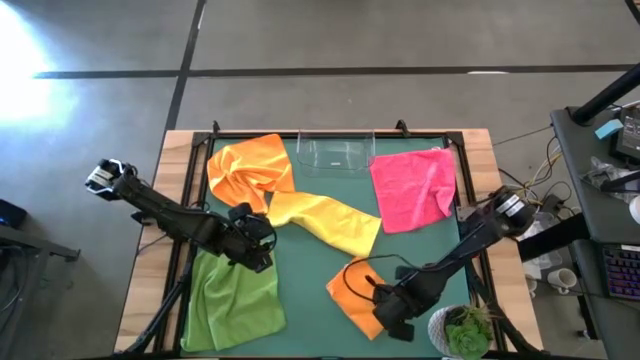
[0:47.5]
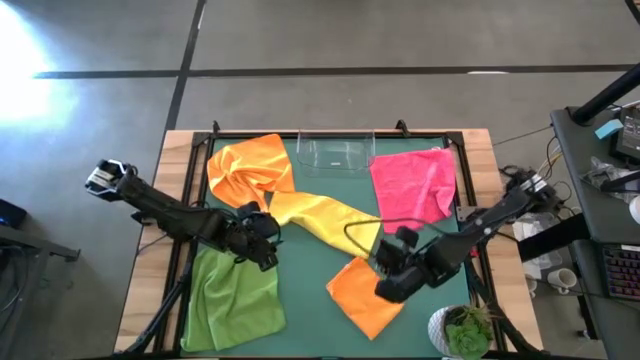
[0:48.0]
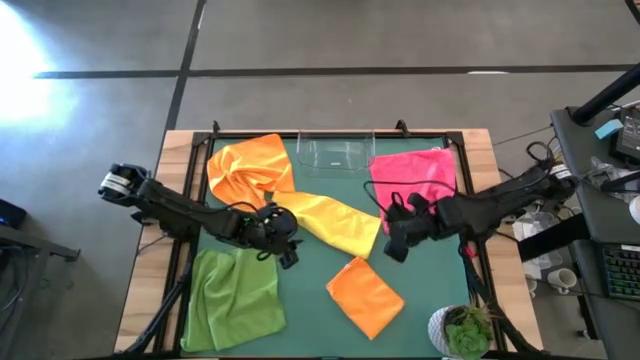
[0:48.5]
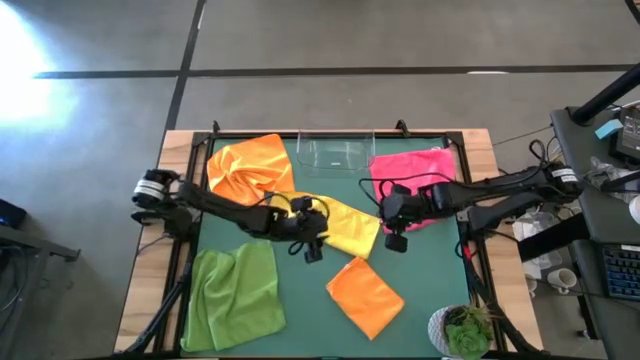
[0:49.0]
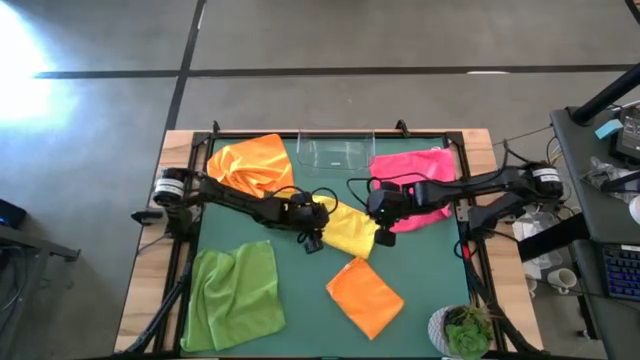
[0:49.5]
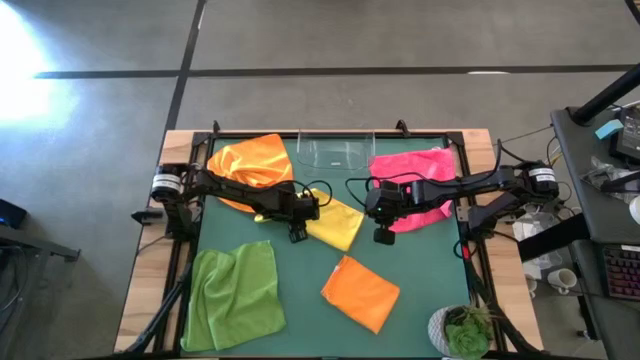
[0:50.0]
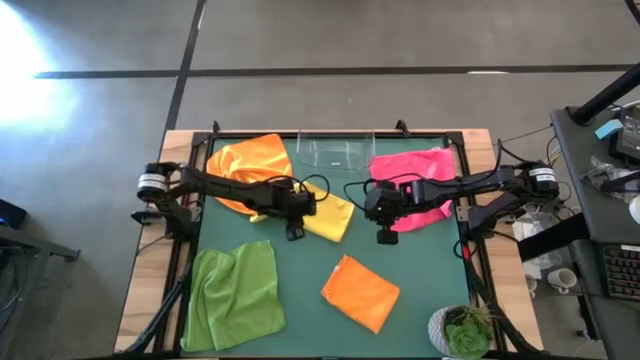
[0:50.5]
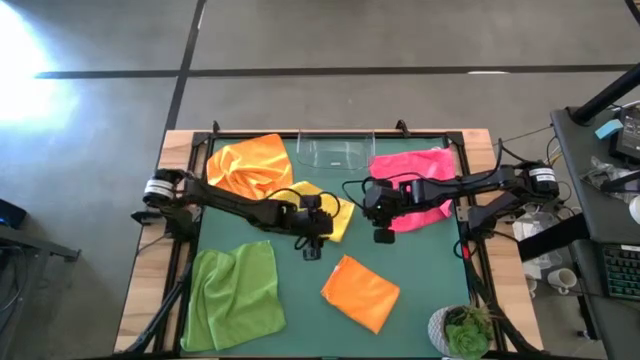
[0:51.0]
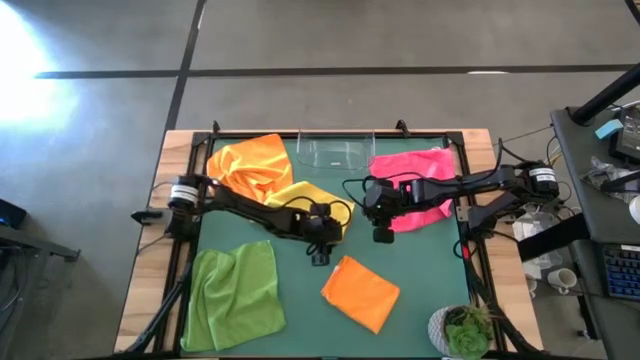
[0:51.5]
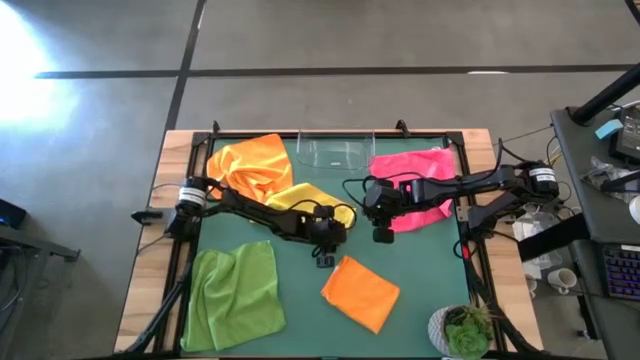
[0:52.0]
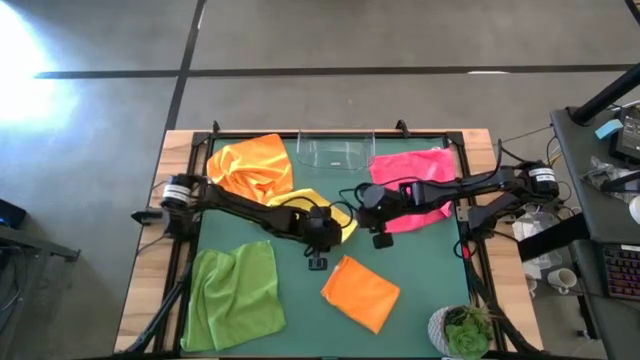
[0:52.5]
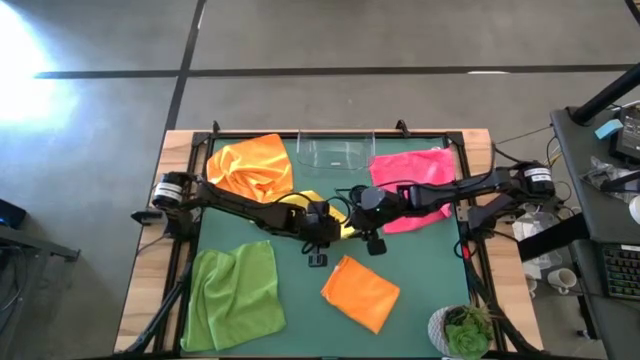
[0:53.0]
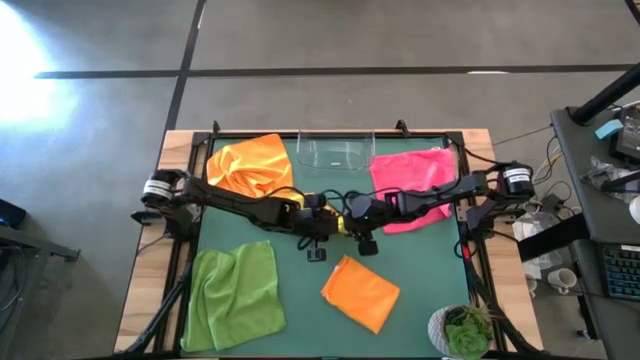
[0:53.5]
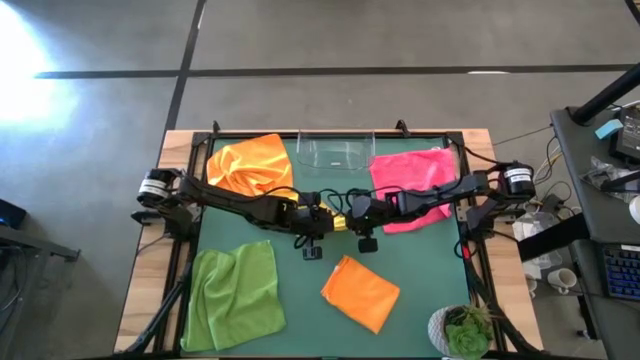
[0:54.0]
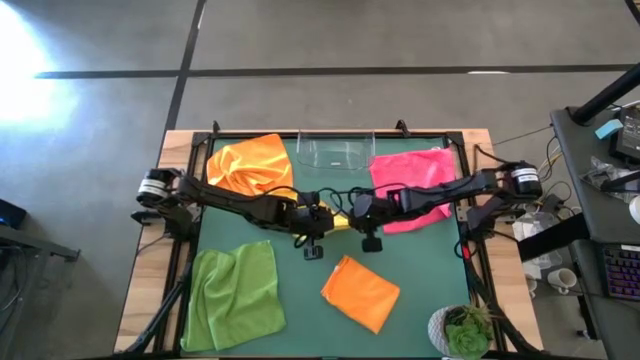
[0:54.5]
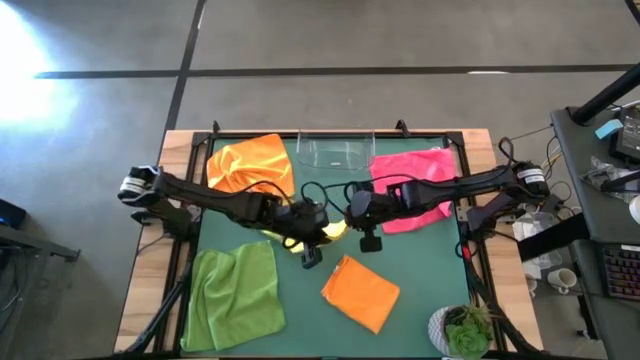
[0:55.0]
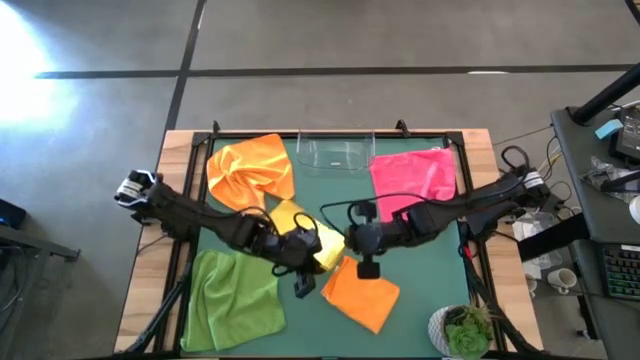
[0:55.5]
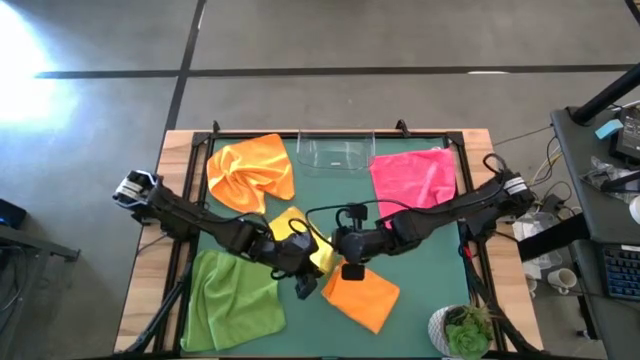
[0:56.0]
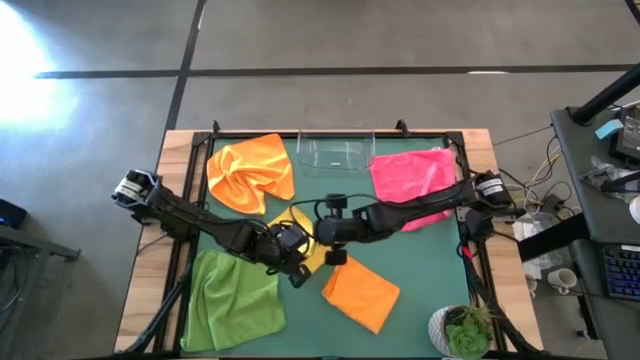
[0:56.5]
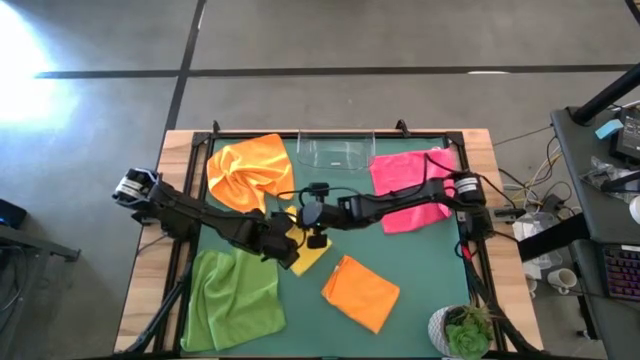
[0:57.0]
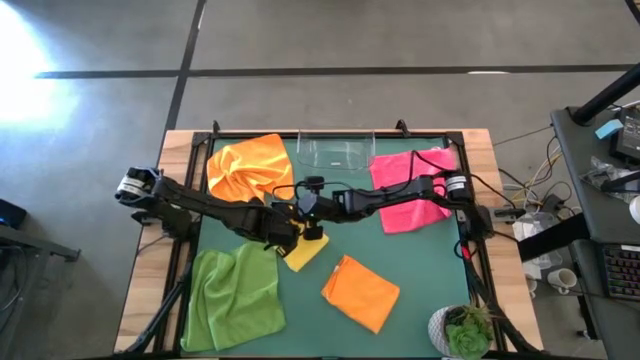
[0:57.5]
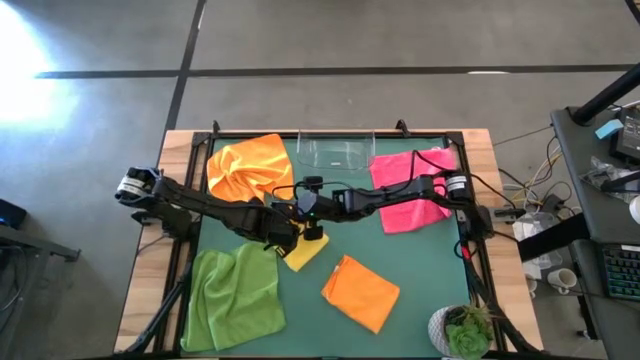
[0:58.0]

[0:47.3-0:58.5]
Task: Fold microfiber towels
Fold the yellow microfiber towel

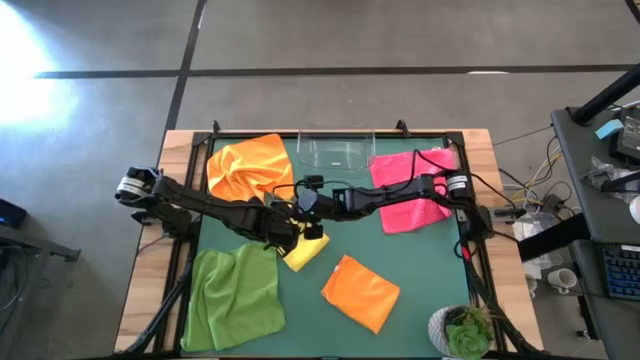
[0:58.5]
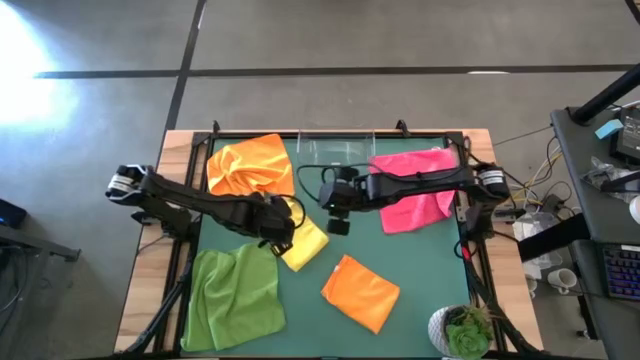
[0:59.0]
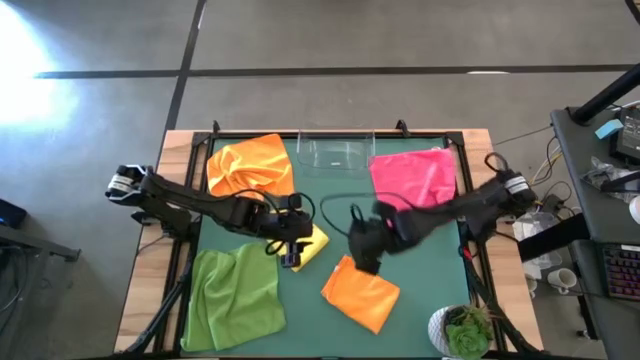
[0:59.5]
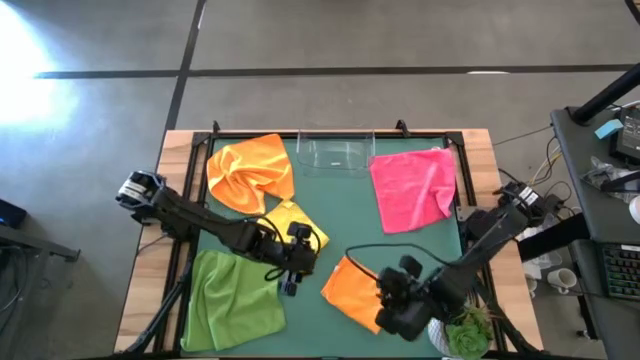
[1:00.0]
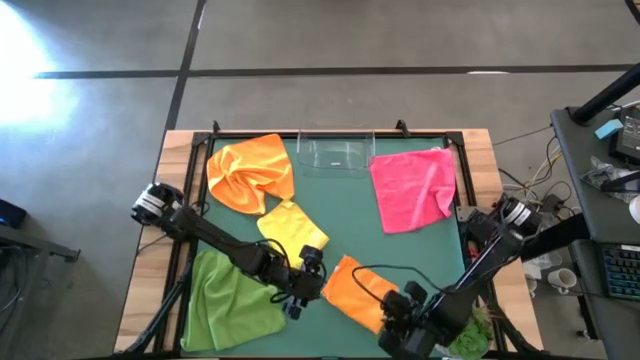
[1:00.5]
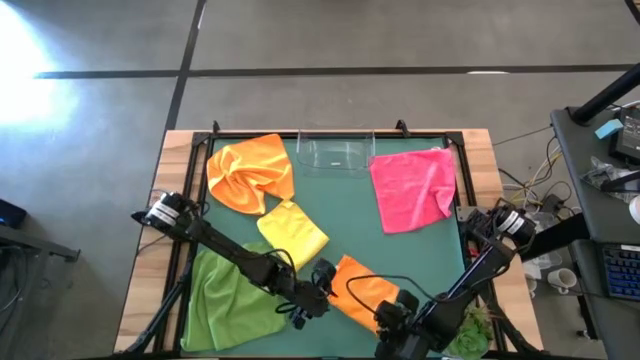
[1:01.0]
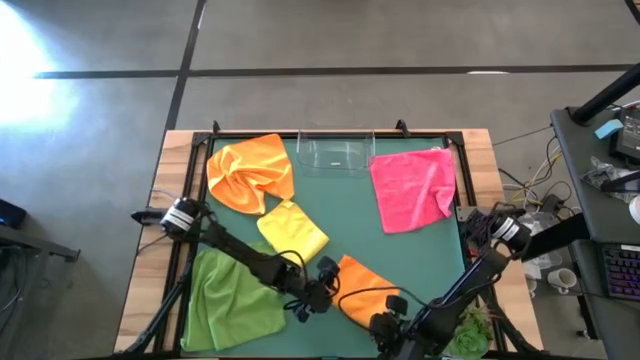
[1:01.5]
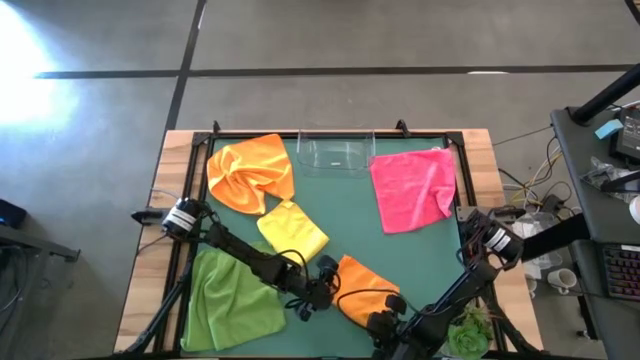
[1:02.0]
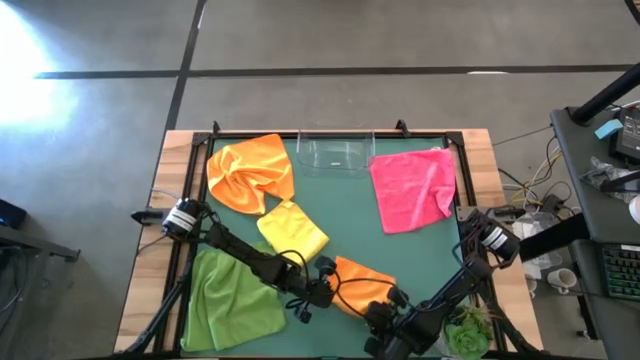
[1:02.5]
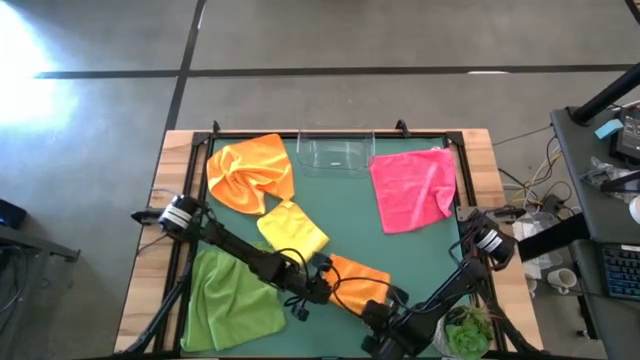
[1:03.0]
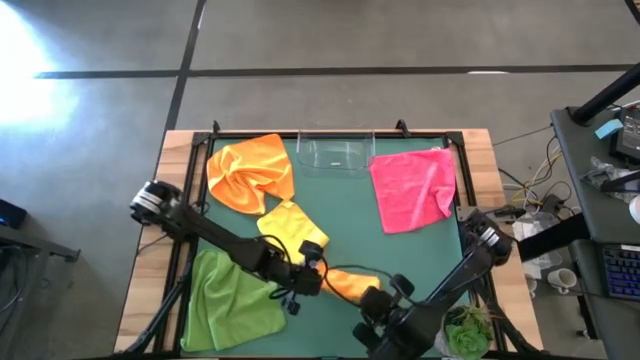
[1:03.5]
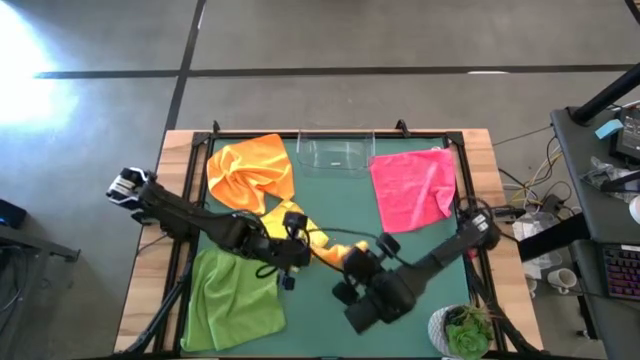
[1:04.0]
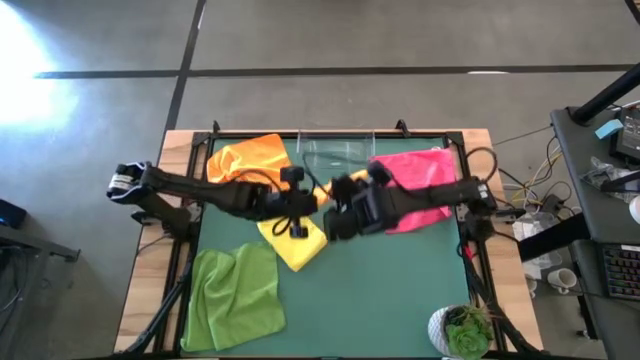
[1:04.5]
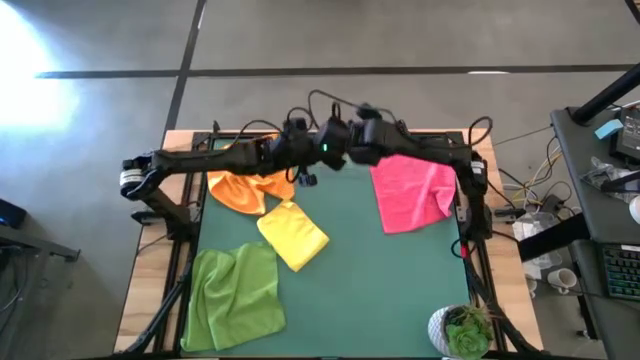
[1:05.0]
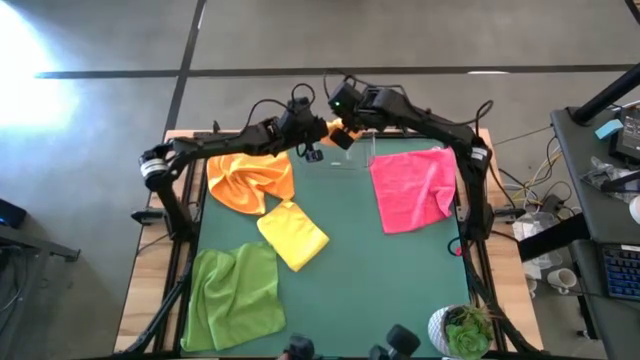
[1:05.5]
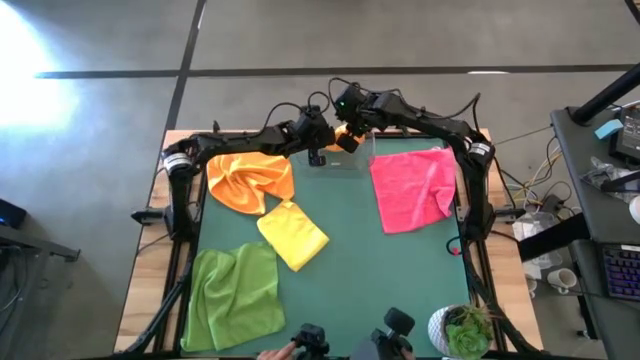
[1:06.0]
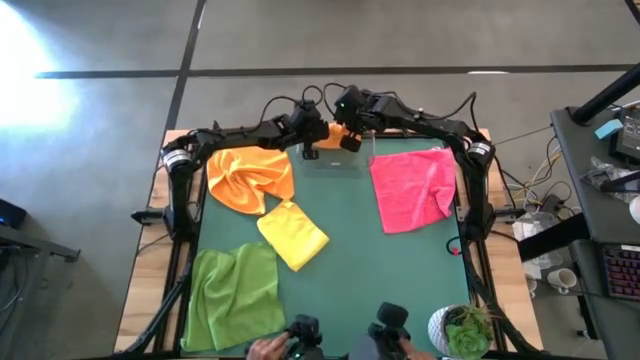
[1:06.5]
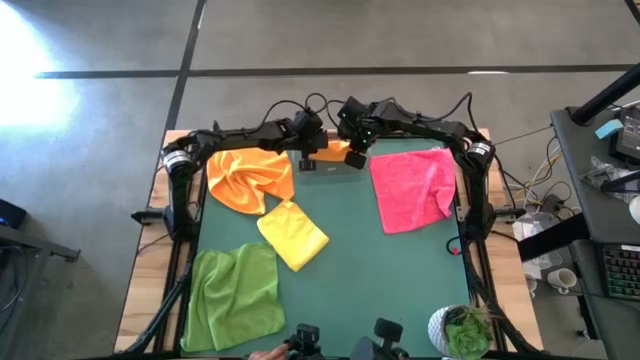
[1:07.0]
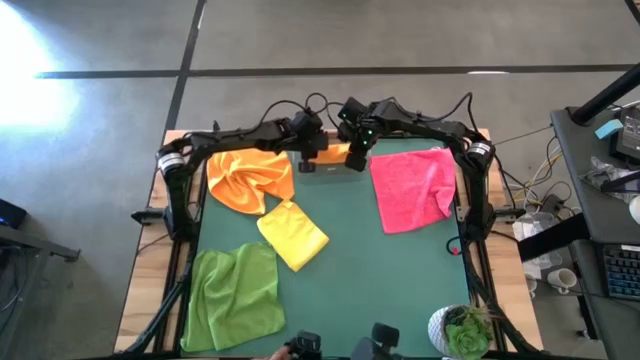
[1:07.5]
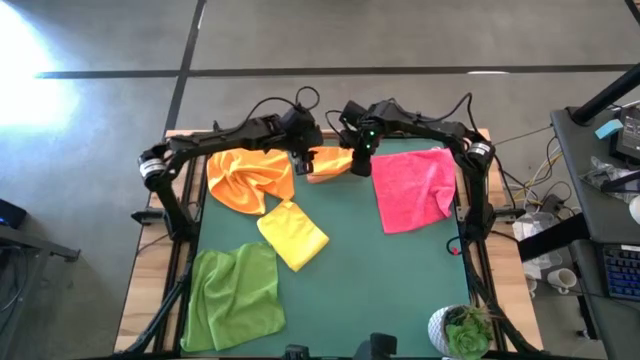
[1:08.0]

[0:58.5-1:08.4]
Put the bottom orange microfiber towel into the transparent bin
